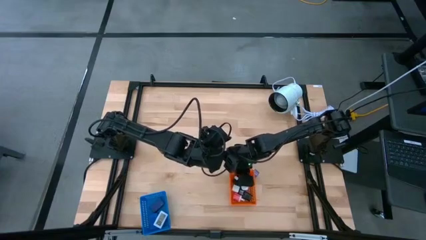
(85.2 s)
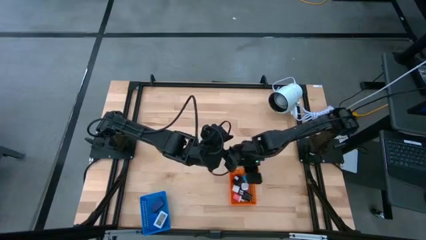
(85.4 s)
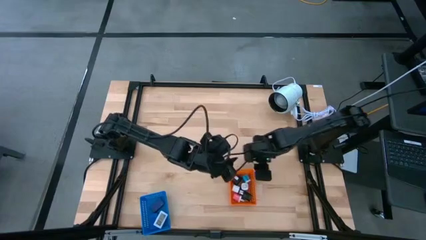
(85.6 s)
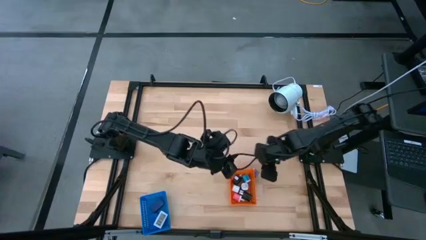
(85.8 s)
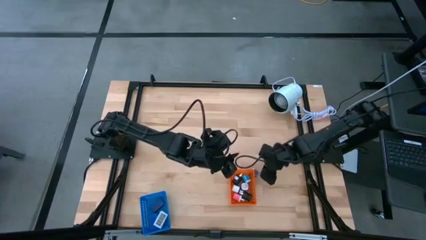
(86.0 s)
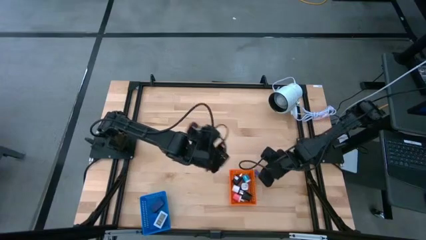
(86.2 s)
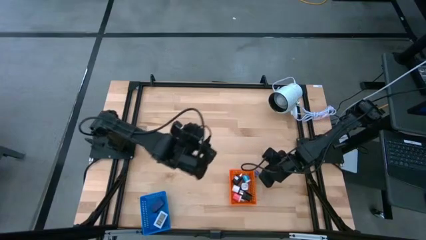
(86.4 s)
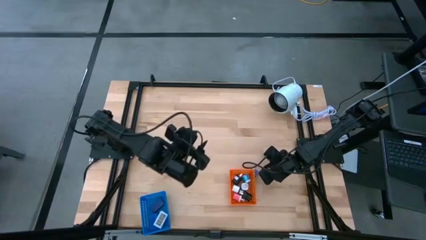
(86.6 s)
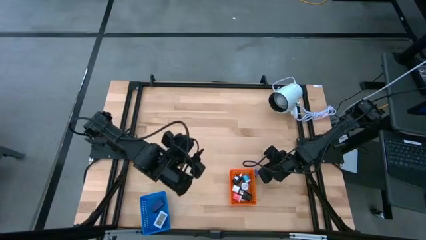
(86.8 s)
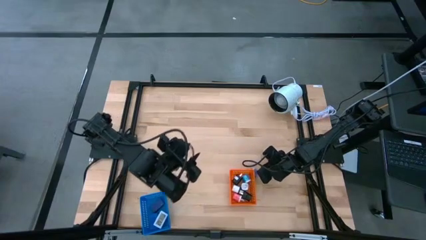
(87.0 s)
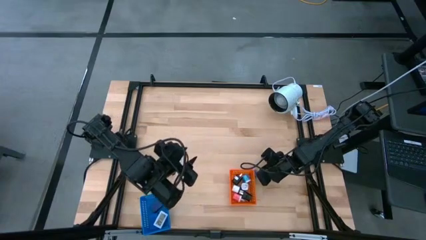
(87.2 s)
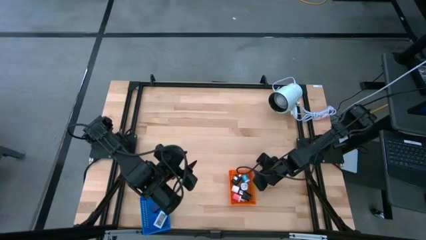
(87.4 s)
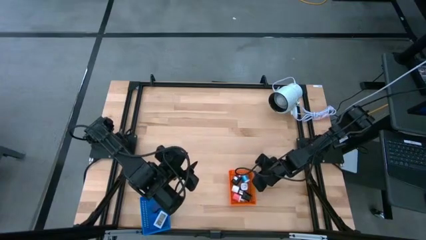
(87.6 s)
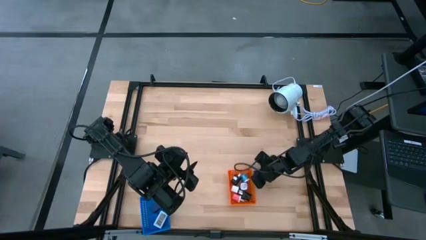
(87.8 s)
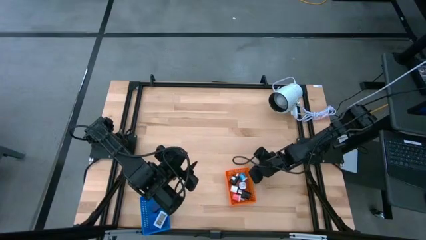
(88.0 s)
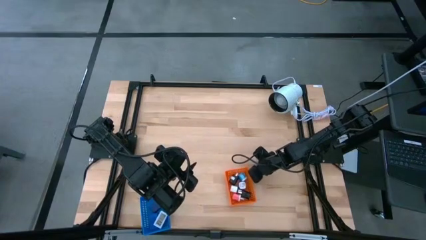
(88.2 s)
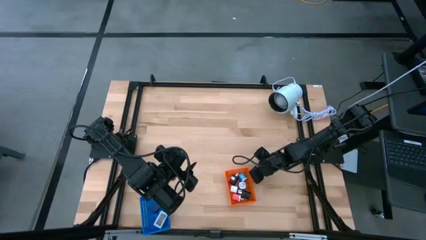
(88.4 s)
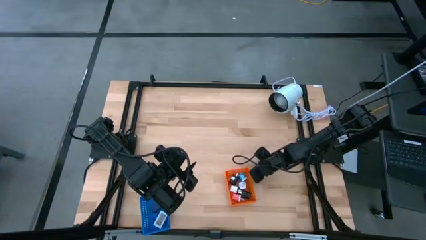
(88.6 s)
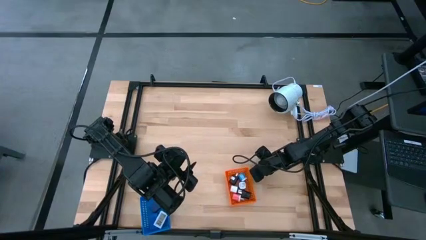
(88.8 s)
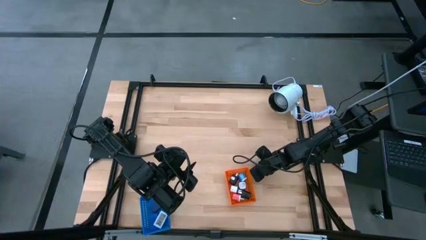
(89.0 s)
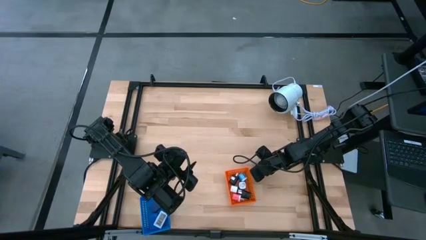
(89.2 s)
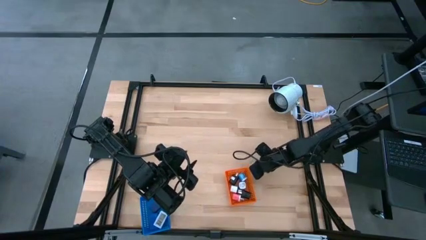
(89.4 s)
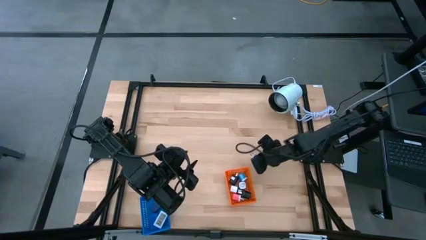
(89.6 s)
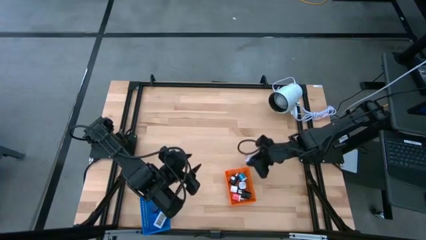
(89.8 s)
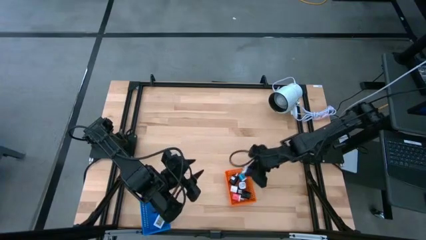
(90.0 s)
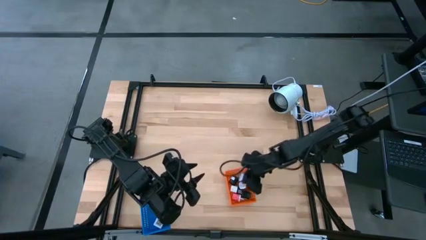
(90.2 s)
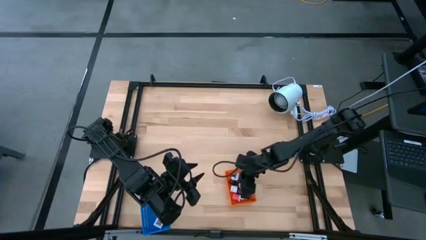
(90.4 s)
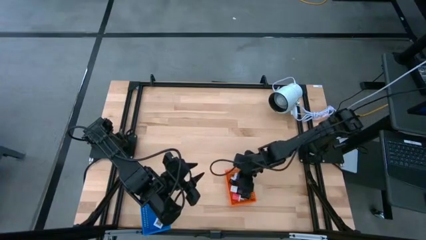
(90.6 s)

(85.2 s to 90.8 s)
Task: Pick & Place Office items
Put the purple charger adapter into the orange bin

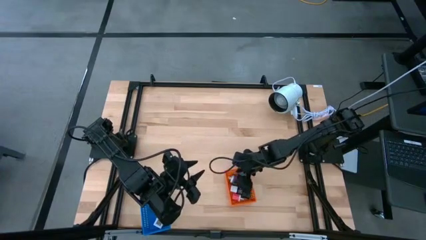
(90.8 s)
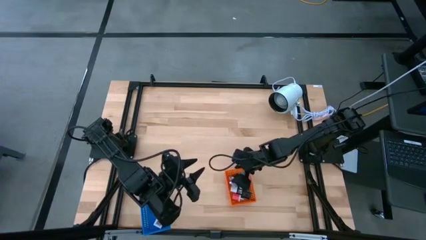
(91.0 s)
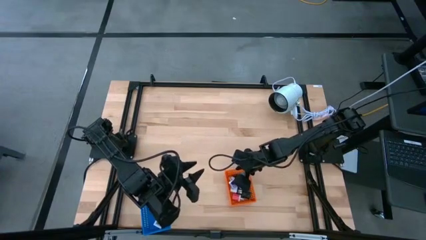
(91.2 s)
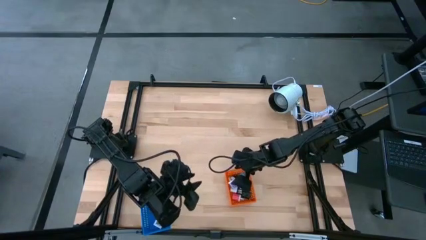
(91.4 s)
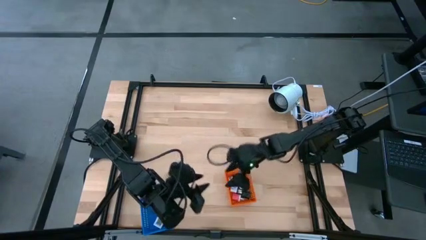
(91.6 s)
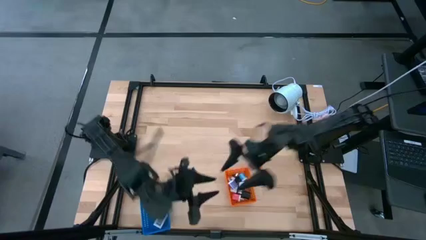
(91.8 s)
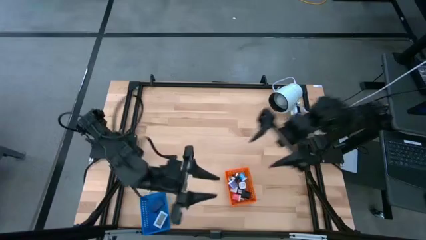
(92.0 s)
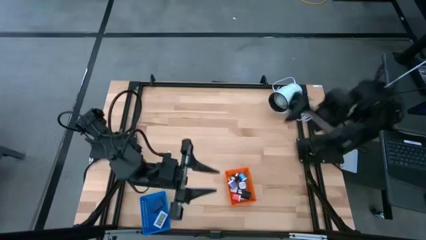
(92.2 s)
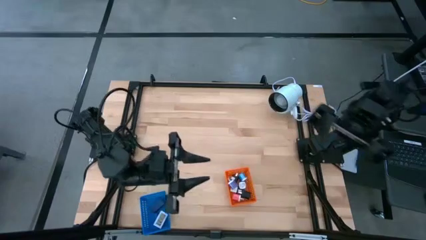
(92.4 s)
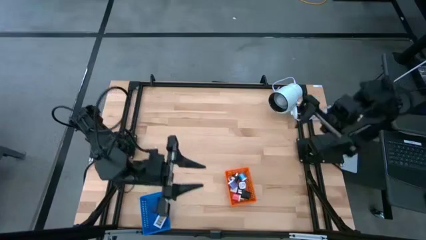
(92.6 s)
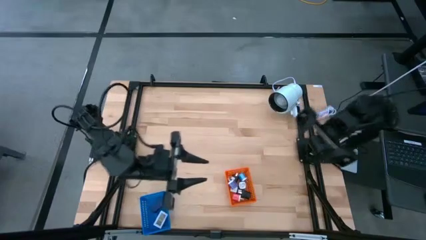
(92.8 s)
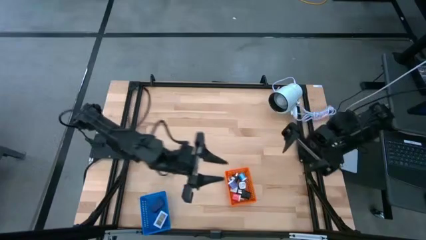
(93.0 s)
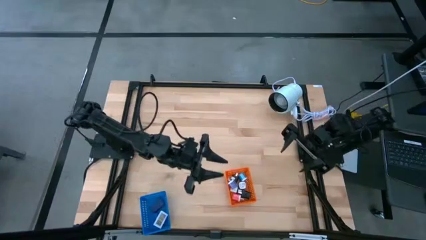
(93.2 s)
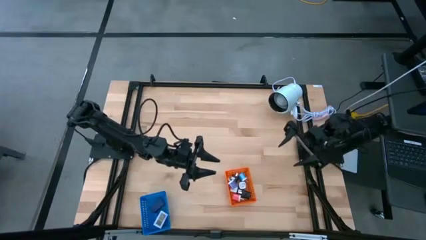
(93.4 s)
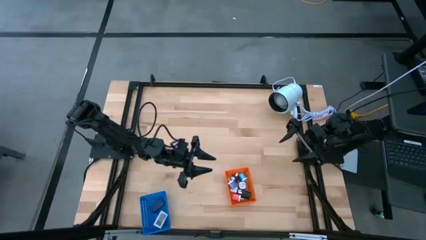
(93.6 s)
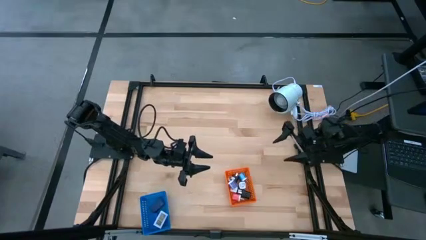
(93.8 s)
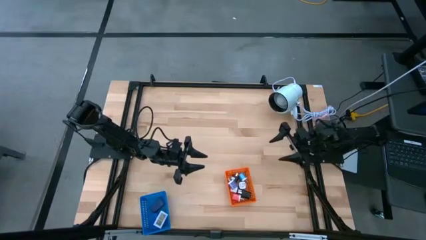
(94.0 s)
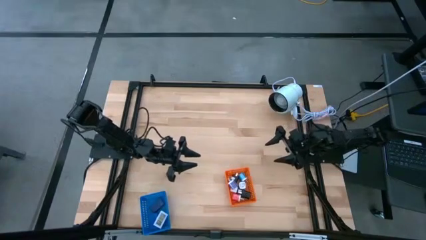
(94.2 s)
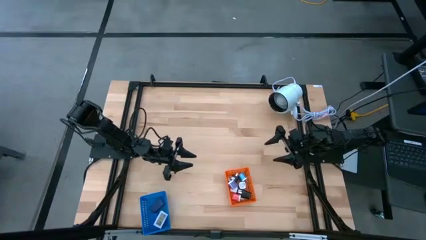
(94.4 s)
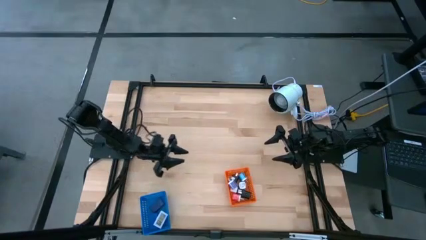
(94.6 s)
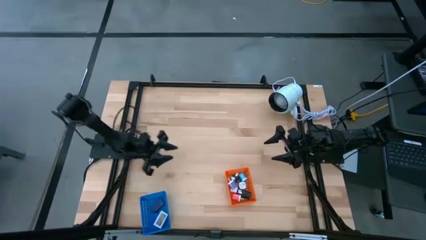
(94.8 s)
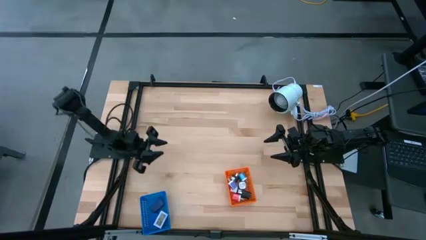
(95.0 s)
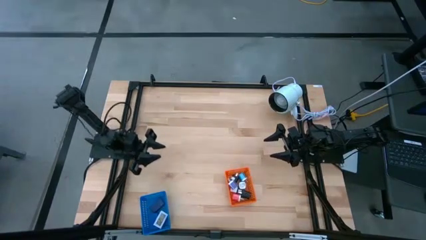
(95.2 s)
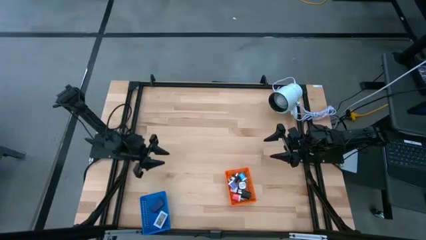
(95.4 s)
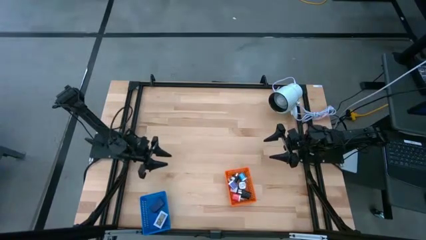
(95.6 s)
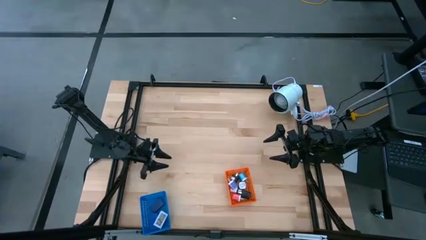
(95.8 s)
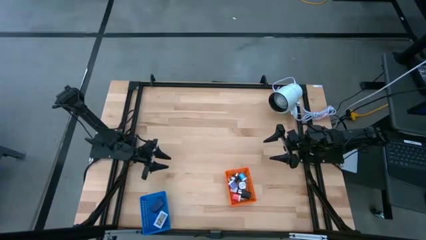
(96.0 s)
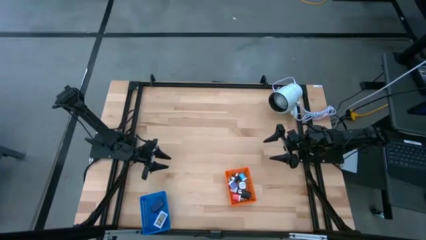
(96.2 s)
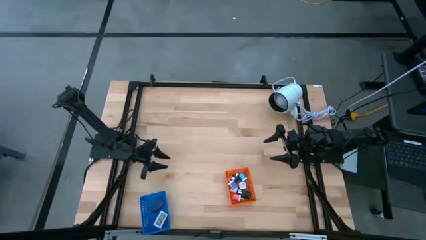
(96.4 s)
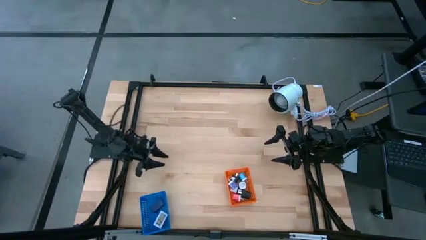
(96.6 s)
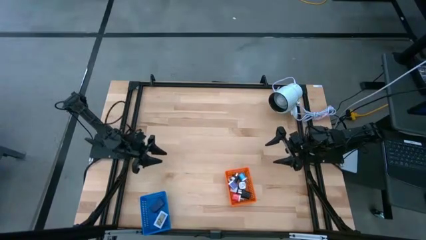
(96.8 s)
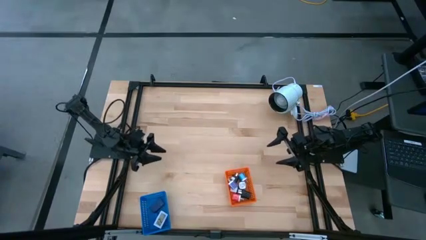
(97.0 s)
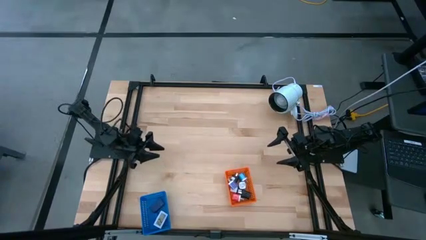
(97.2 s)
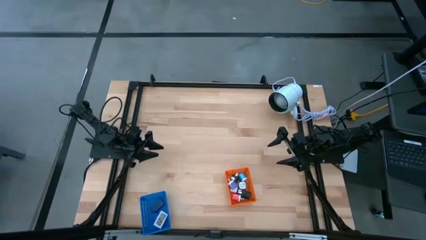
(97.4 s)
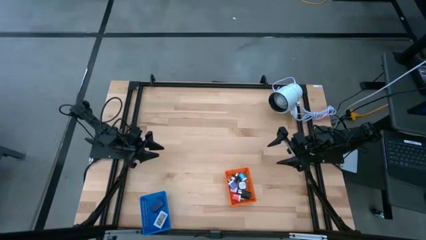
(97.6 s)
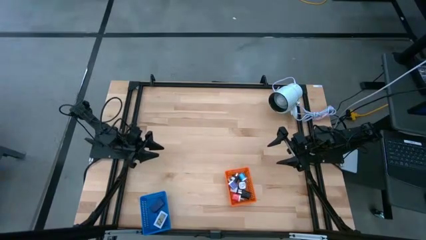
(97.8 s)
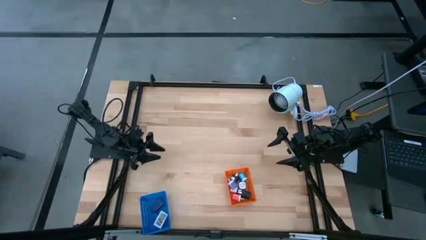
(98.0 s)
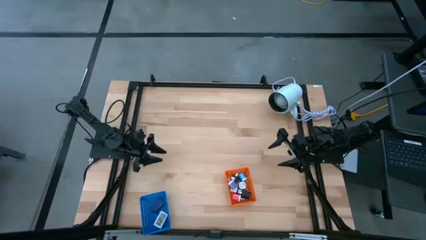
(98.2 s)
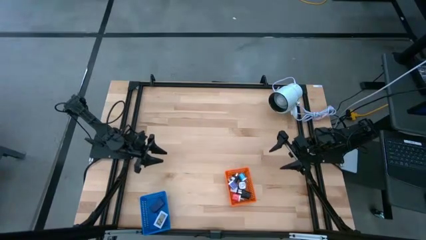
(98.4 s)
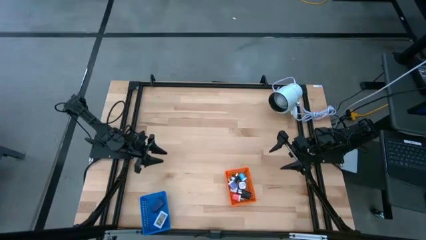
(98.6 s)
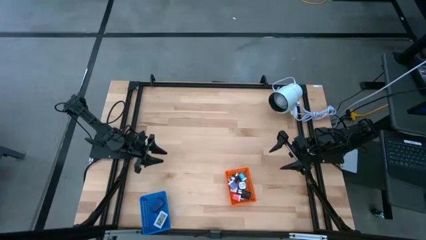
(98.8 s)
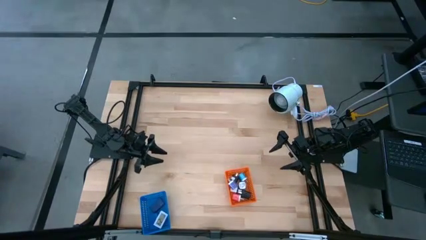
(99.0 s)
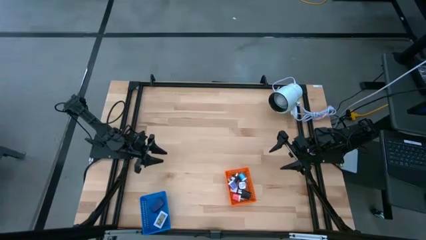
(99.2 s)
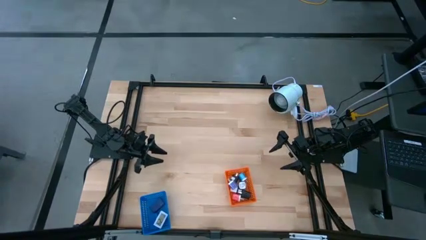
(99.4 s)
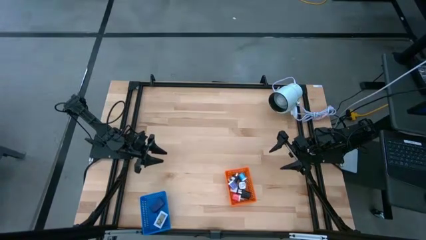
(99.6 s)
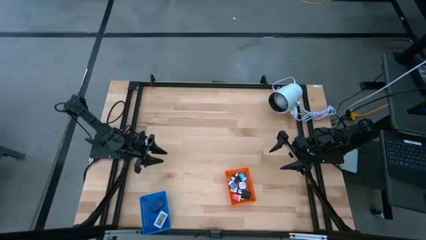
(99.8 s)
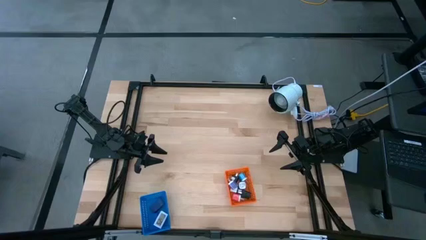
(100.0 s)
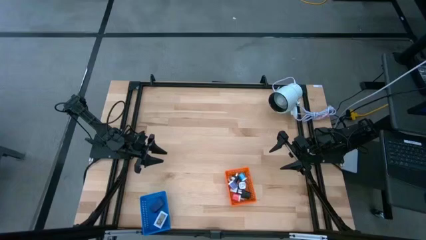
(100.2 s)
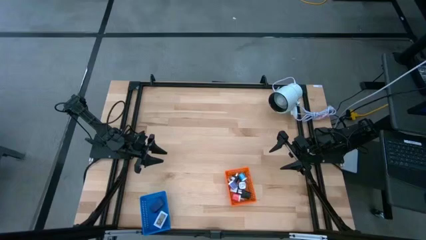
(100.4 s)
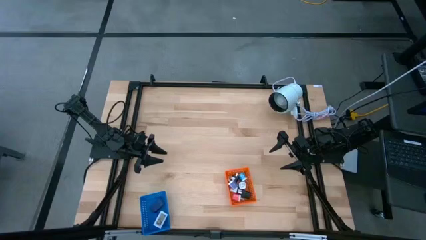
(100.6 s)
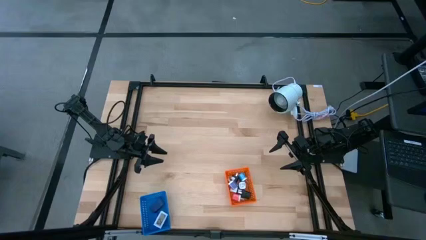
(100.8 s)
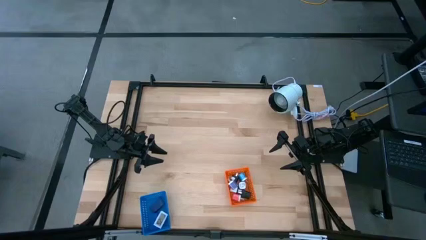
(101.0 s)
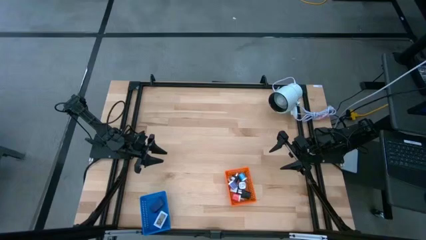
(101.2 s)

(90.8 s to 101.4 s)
Return to Home Position
